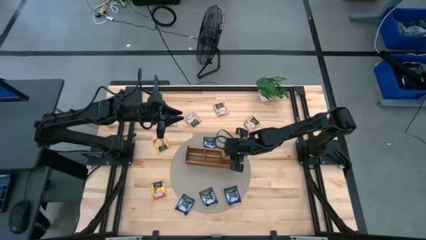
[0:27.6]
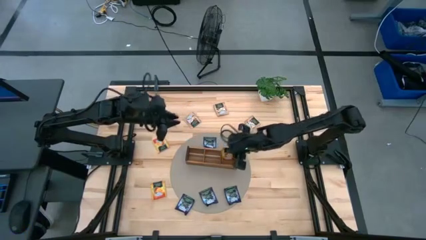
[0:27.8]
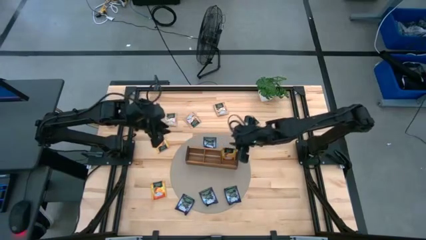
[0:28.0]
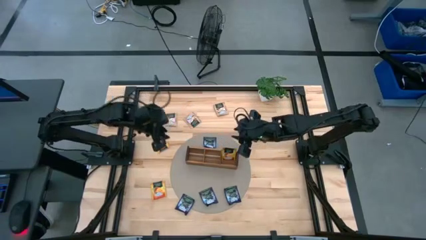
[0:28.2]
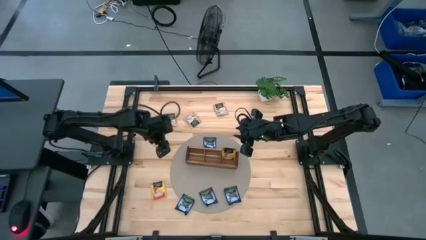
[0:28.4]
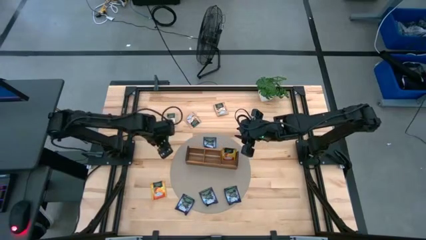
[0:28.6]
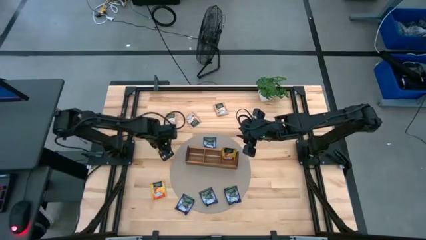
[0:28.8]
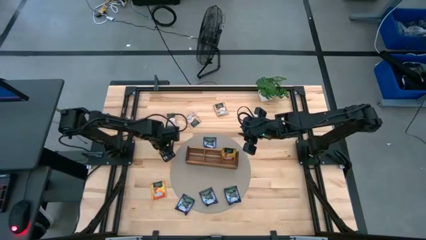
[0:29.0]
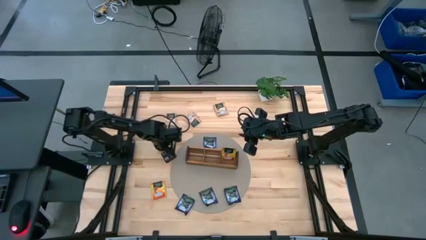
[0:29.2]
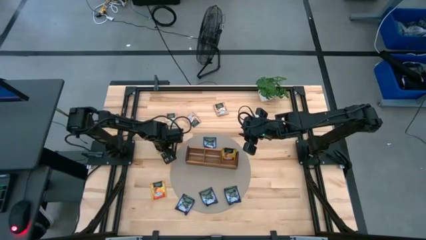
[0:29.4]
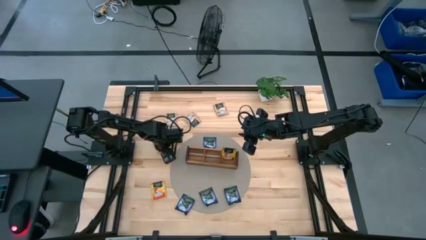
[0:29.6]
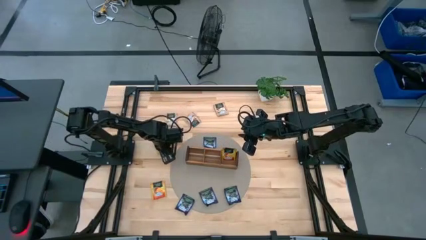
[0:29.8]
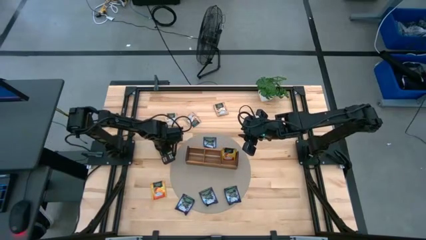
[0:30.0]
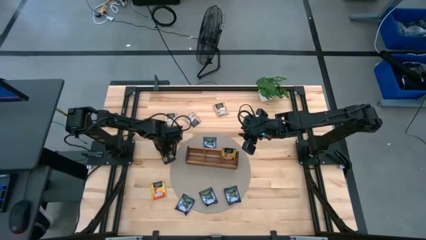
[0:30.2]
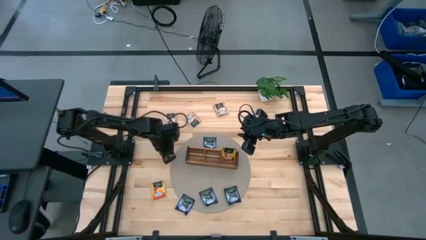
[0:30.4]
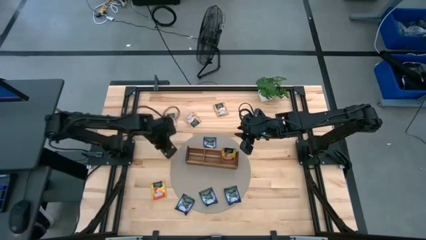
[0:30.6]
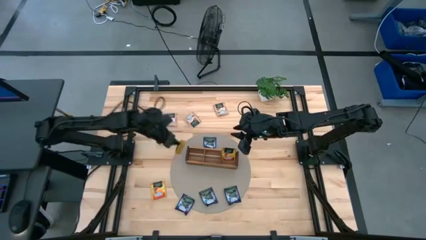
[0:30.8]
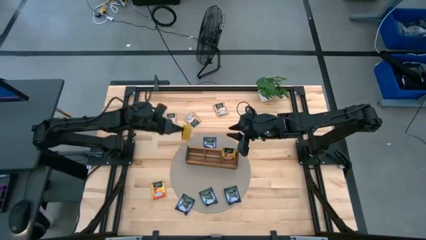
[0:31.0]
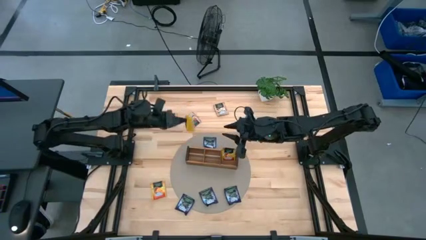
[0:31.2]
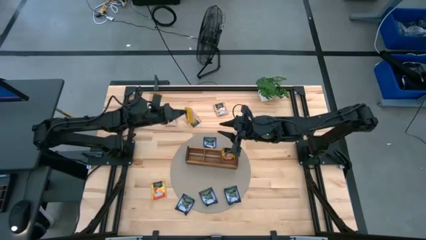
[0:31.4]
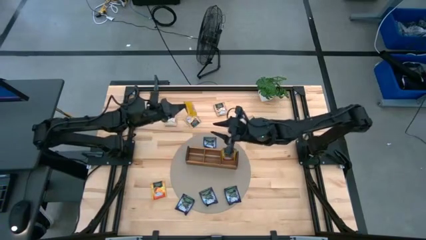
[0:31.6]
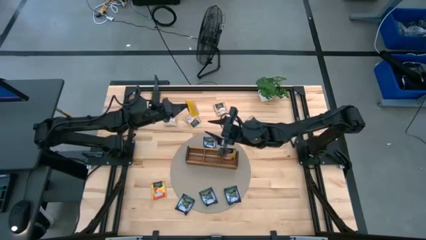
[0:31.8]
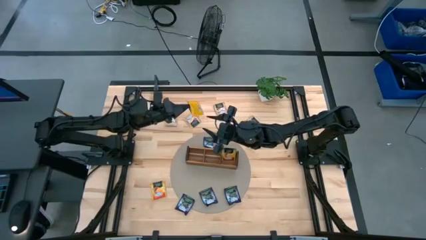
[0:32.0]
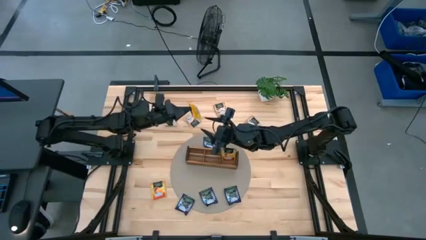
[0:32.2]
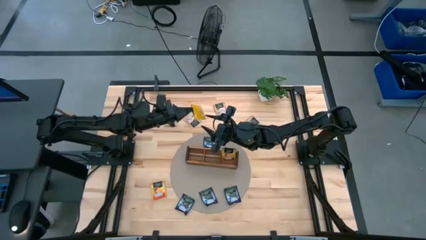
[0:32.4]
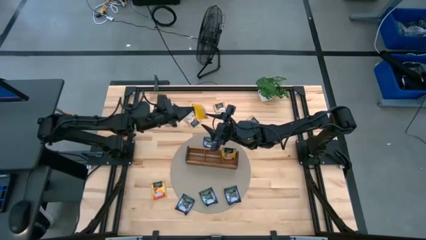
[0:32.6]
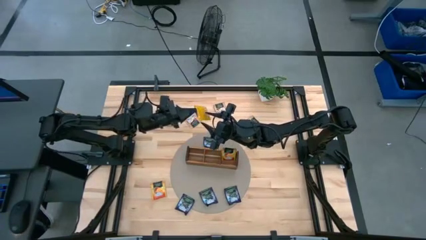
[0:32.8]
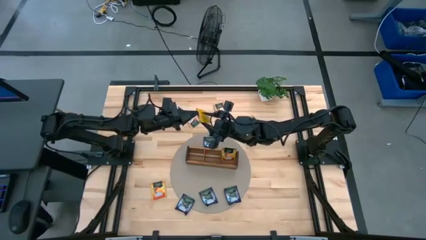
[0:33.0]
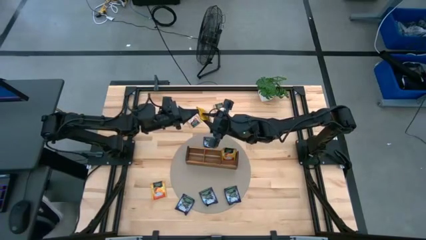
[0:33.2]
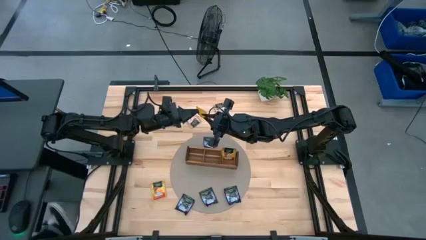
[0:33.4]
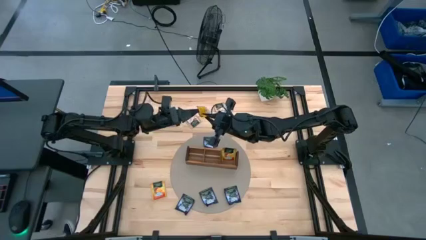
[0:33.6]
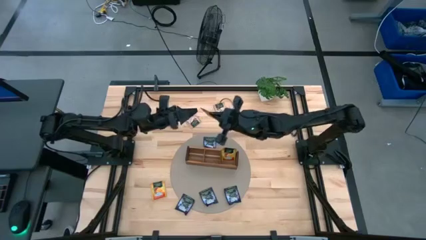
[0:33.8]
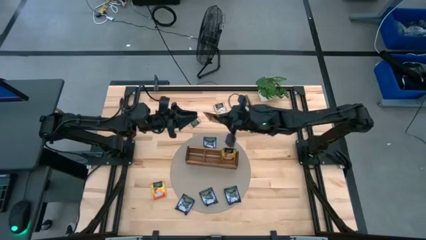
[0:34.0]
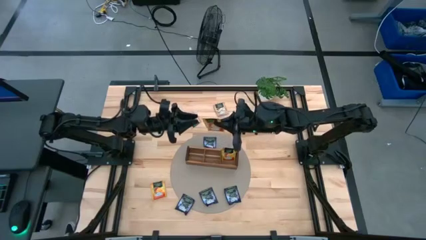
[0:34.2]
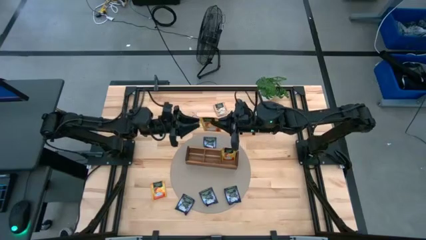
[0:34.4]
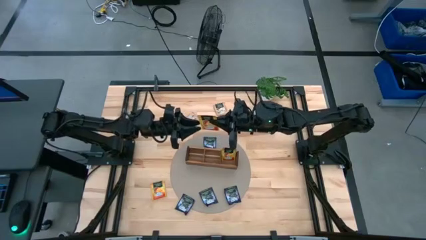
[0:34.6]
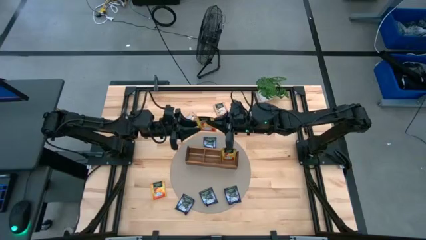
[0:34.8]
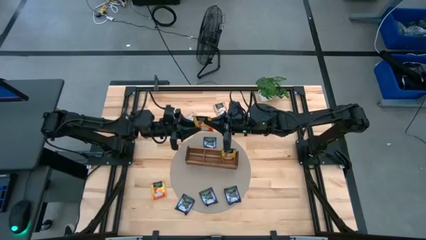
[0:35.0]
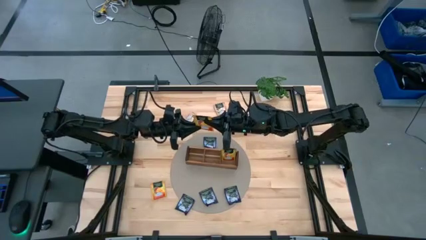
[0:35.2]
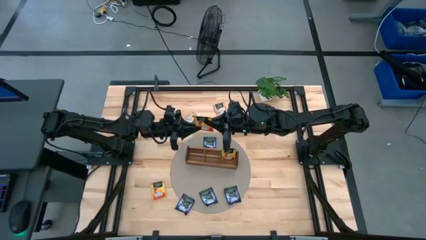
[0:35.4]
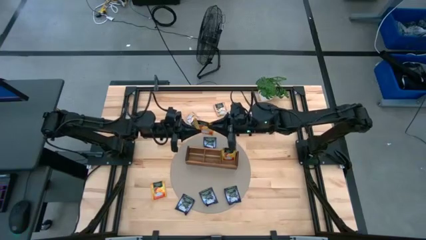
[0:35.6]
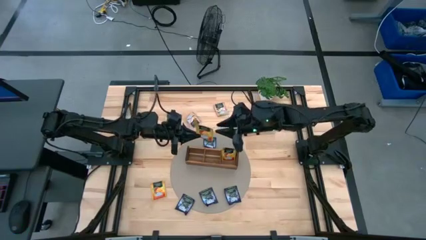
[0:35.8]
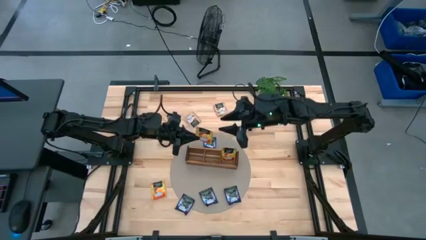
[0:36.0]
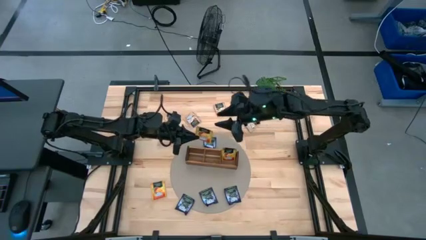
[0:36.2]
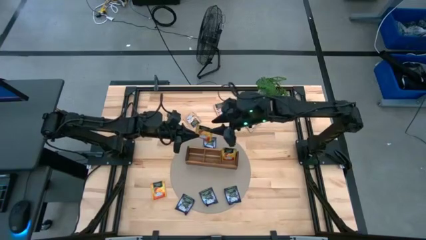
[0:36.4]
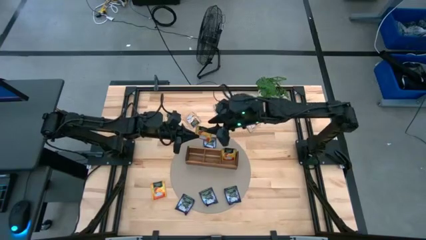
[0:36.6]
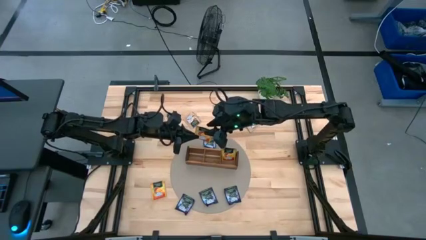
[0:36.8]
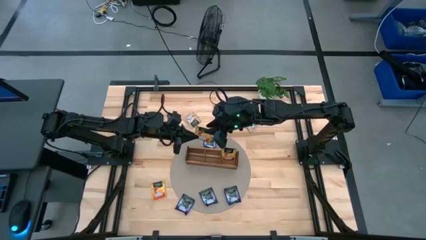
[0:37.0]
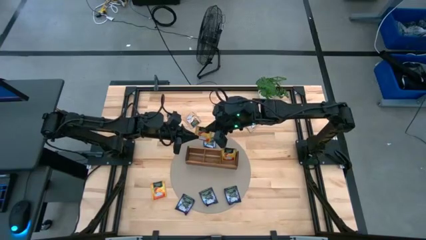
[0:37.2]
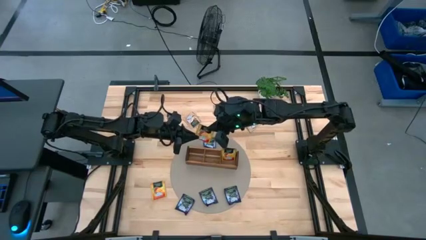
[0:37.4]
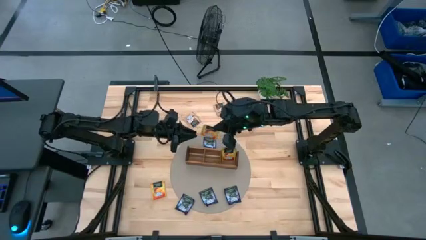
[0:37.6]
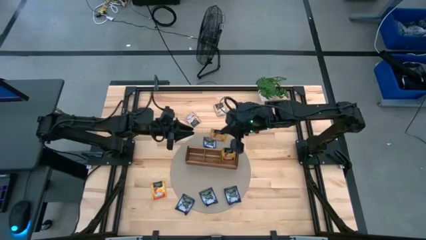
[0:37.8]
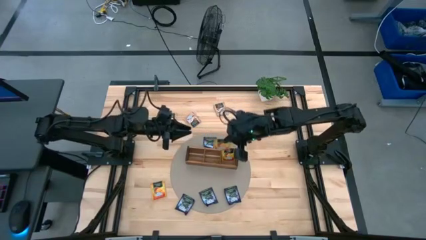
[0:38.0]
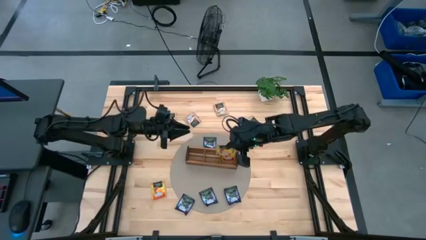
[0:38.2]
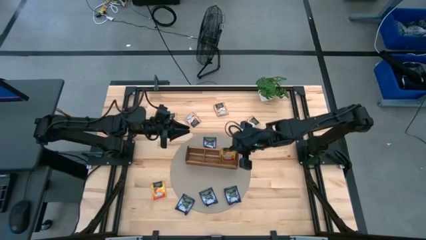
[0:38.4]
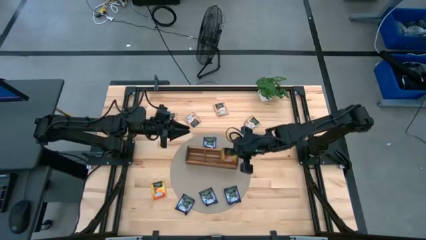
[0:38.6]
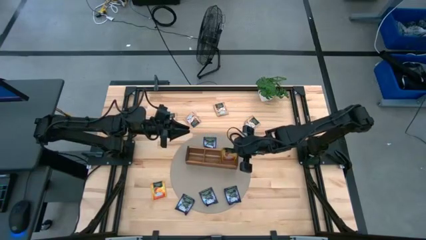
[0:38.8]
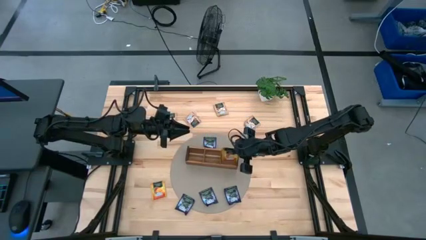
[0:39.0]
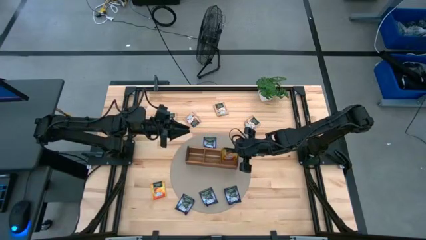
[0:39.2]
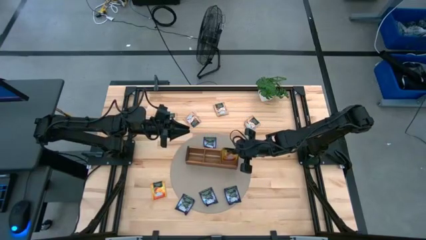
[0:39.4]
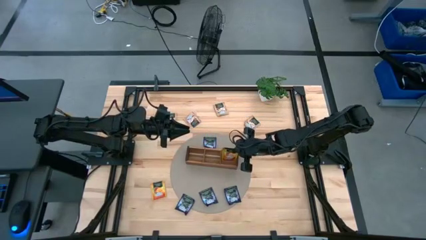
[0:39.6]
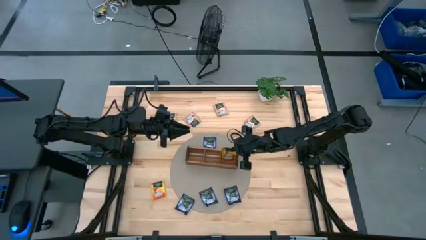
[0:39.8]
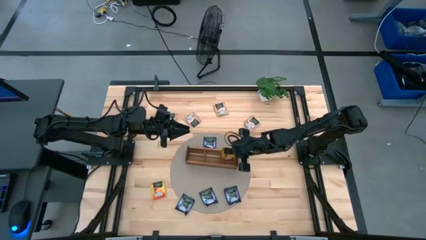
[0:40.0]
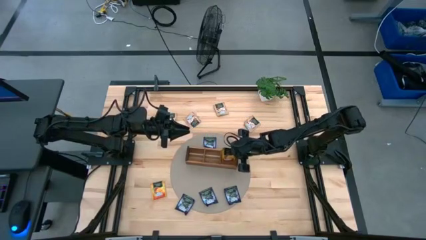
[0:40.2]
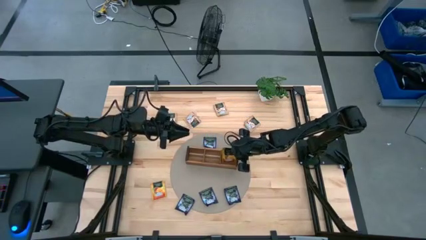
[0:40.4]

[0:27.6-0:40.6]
Task: Pick & Place Tea
Put the yellow tea bag into the right section of the wooden organizer

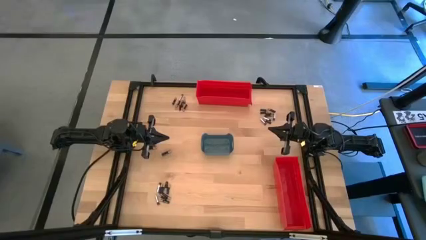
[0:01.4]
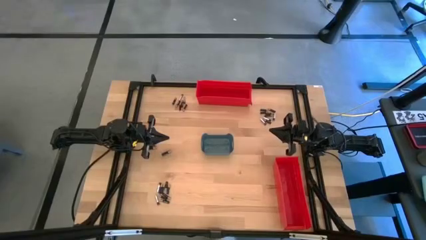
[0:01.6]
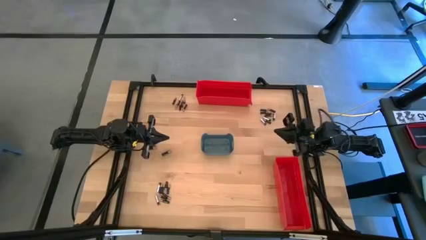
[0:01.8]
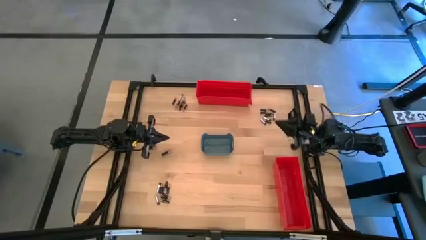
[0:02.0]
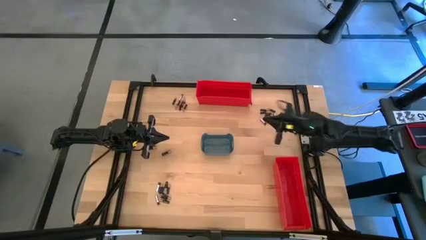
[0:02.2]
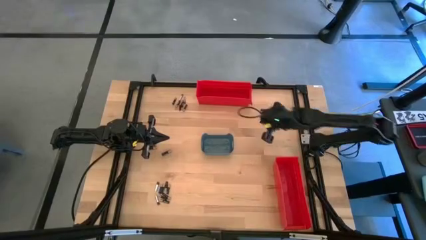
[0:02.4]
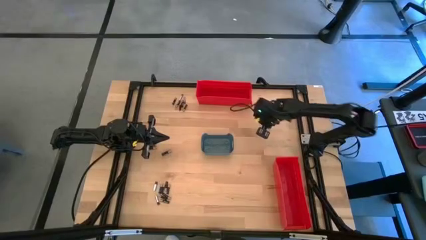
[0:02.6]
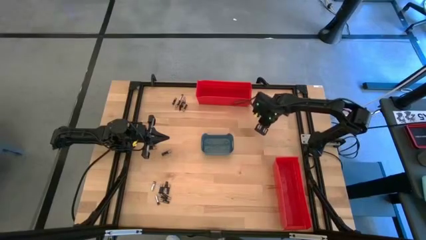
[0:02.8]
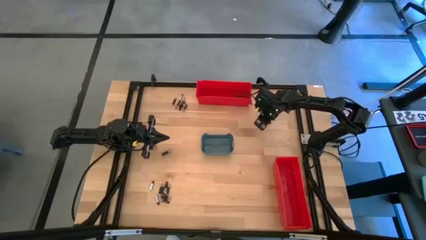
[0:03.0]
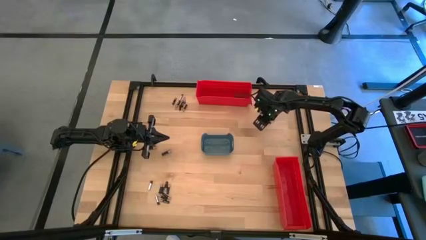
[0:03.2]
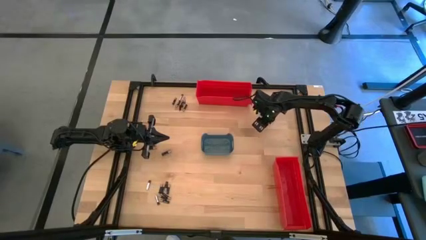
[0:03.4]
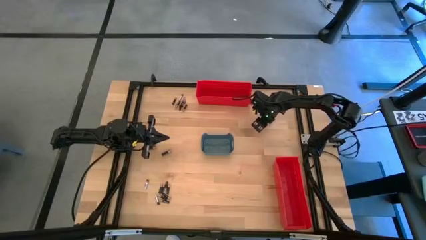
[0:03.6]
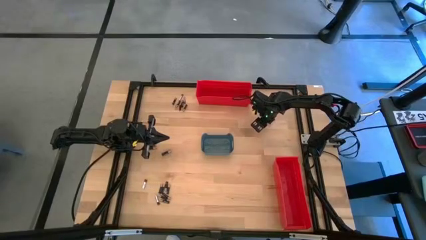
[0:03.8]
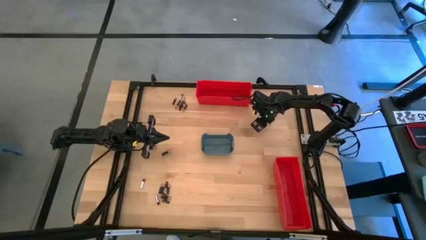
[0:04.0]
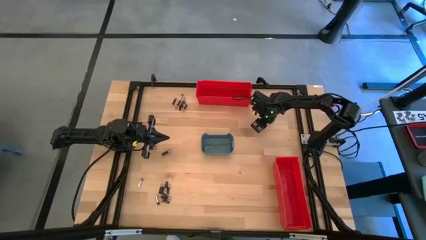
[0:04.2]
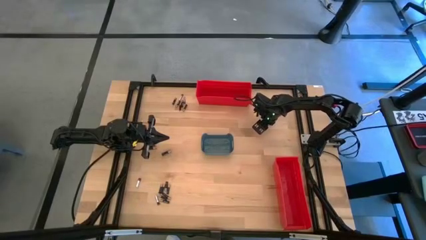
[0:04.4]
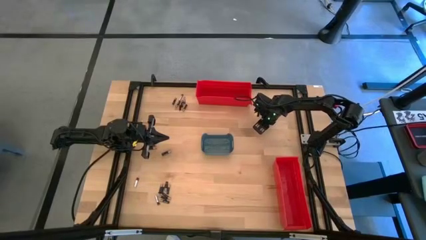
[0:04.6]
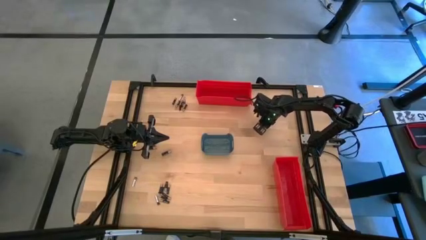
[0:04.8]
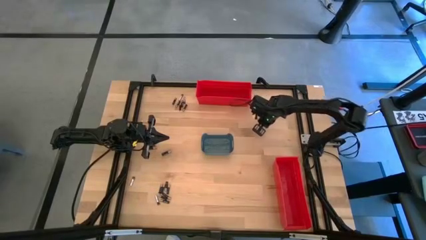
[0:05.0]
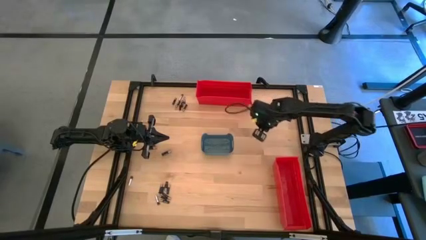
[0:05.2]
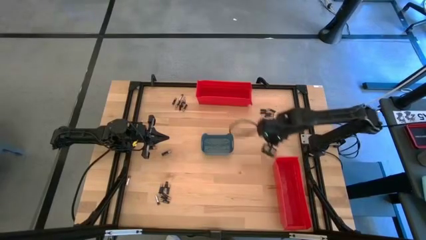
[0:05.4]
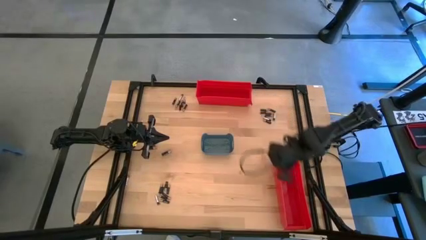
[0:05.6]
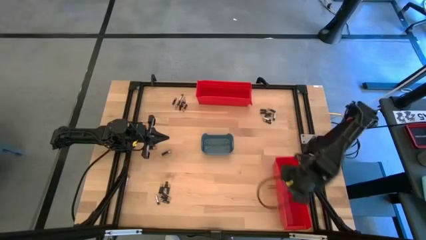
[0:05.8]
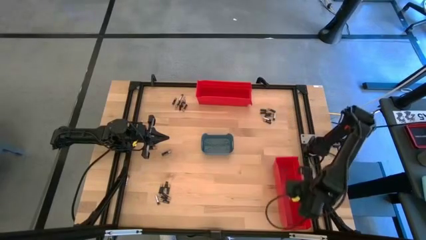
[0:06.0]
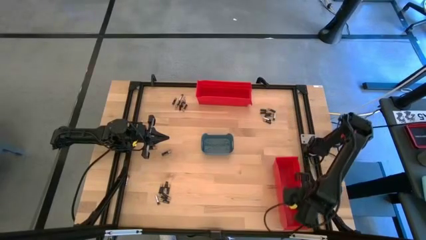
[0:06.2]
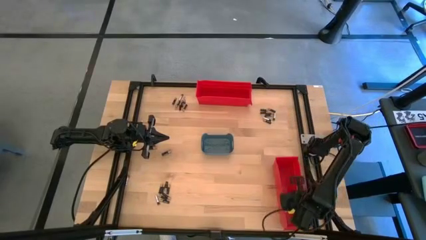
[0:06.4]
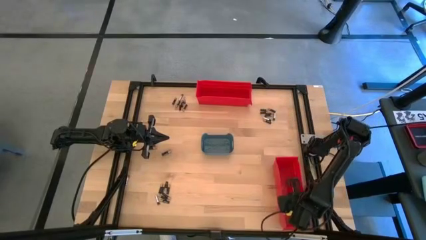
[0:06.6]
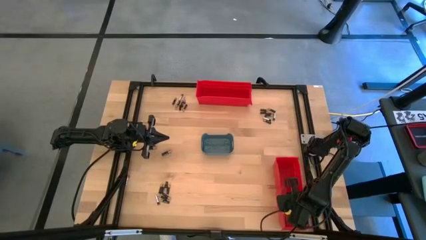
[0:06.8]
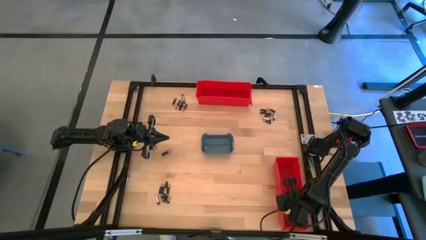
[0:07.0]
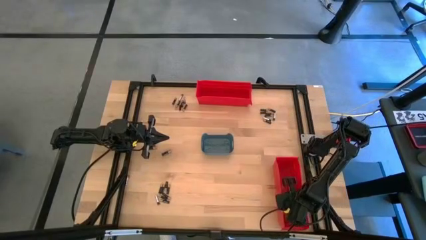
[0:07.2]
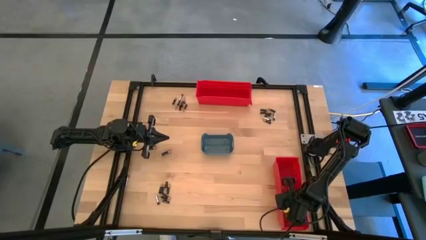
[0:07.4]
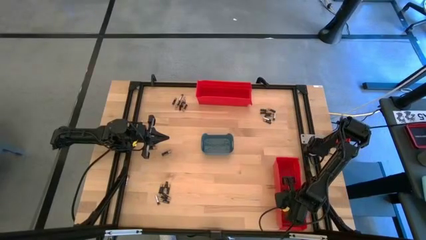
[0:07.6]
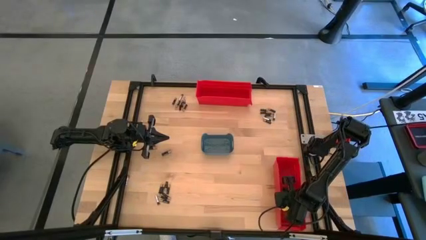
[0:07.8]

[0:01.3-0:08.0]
Task: Sort batteries
Put the silver battery into the bottom red bin
